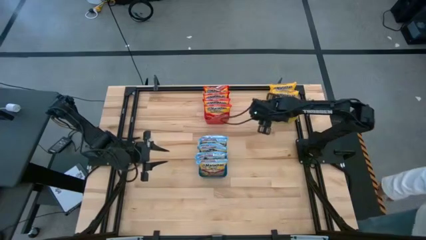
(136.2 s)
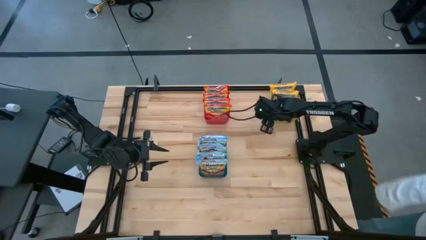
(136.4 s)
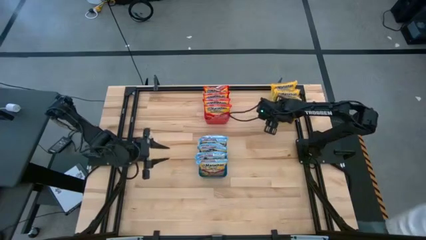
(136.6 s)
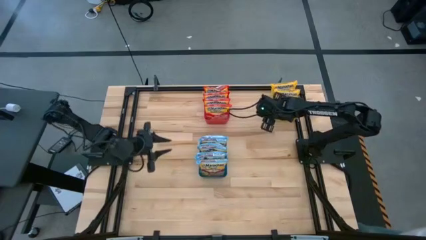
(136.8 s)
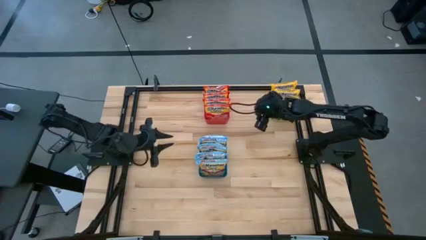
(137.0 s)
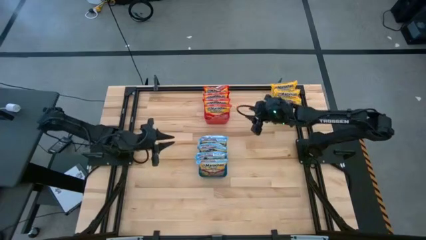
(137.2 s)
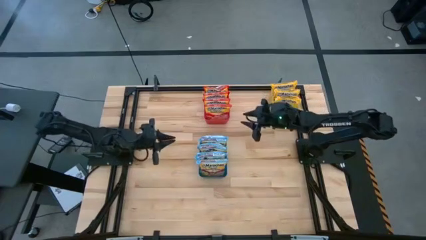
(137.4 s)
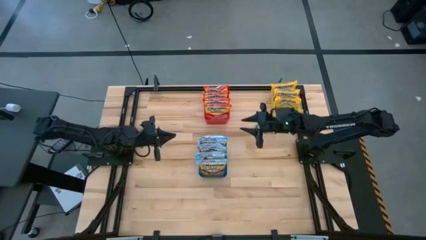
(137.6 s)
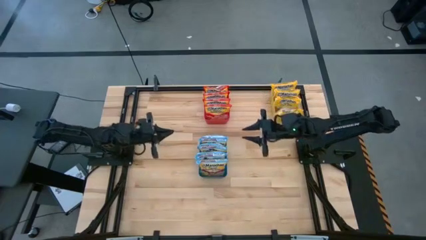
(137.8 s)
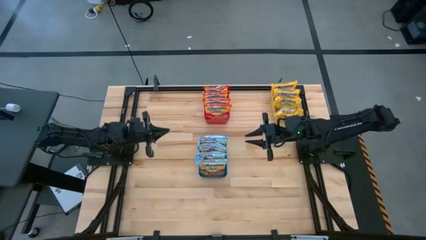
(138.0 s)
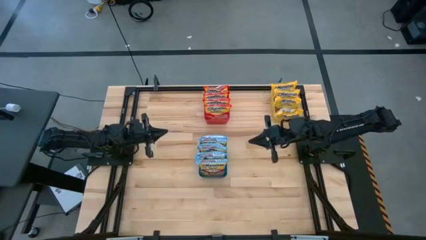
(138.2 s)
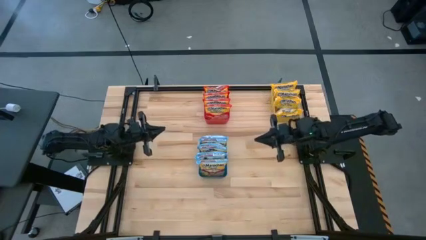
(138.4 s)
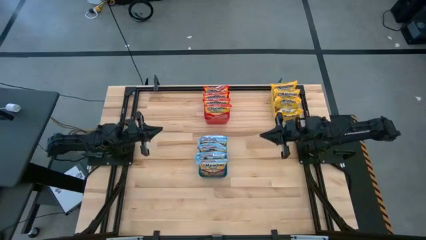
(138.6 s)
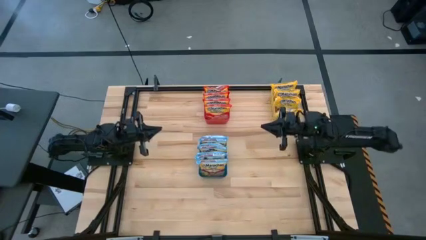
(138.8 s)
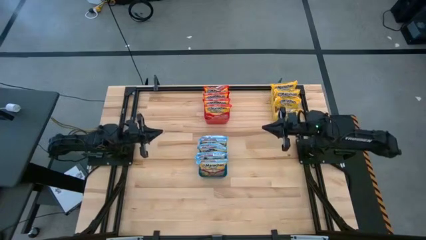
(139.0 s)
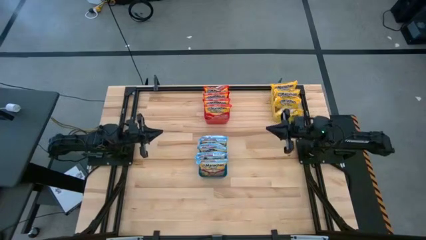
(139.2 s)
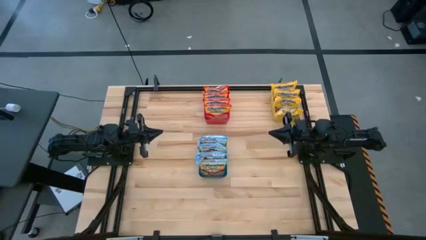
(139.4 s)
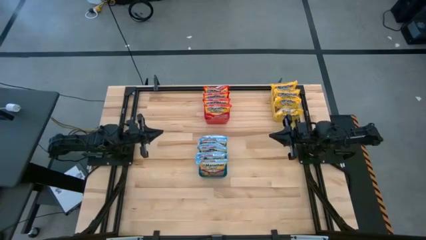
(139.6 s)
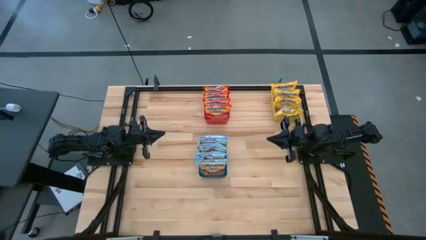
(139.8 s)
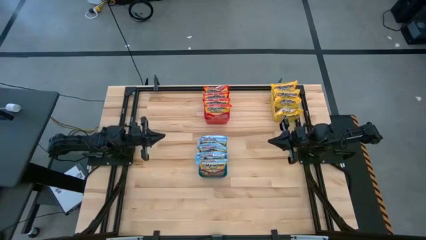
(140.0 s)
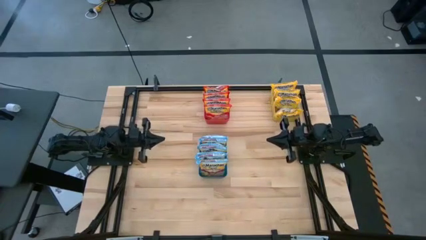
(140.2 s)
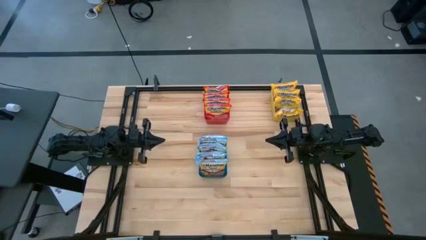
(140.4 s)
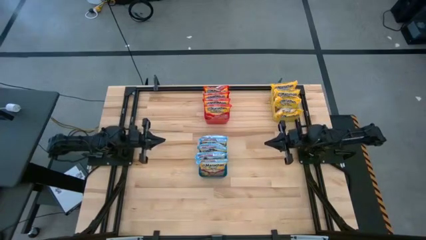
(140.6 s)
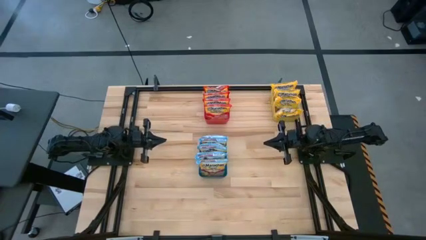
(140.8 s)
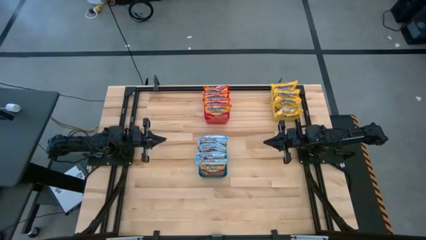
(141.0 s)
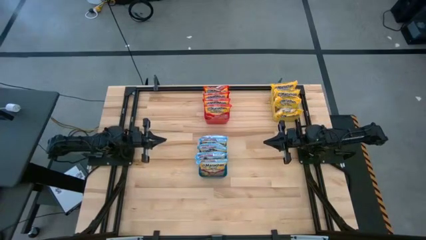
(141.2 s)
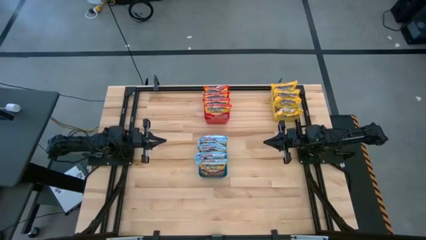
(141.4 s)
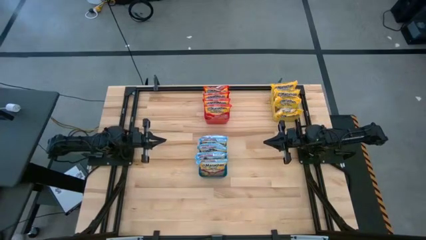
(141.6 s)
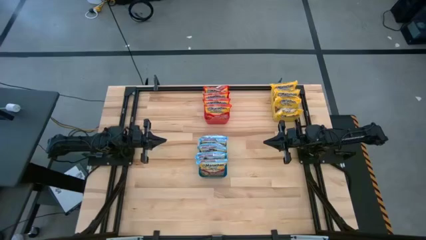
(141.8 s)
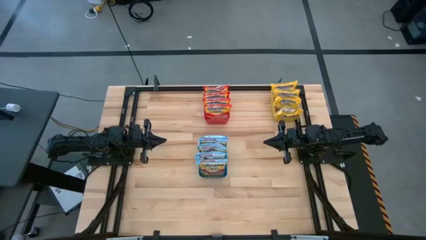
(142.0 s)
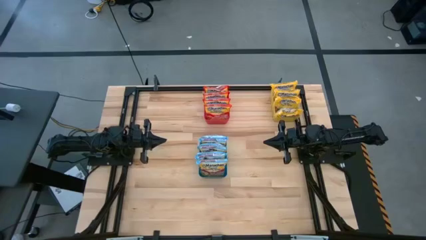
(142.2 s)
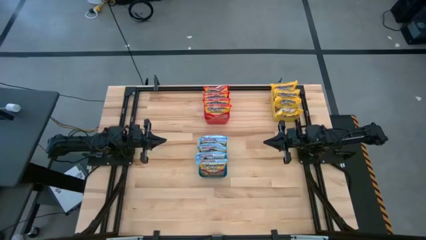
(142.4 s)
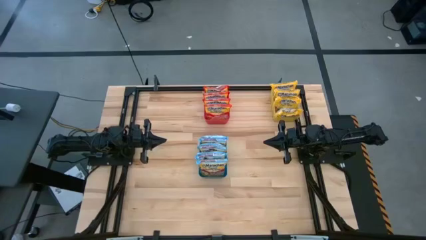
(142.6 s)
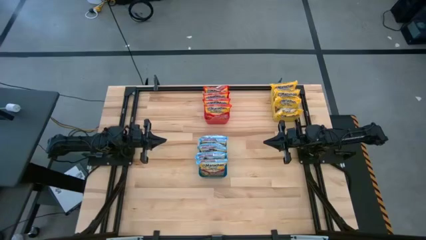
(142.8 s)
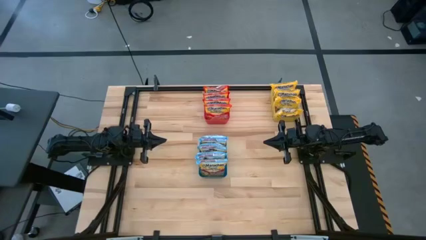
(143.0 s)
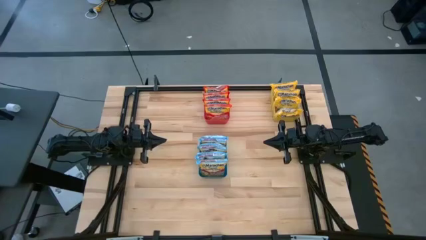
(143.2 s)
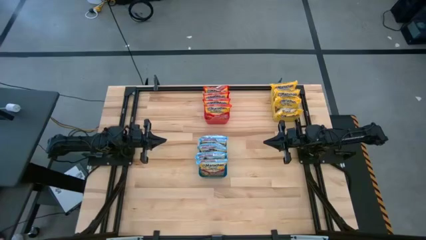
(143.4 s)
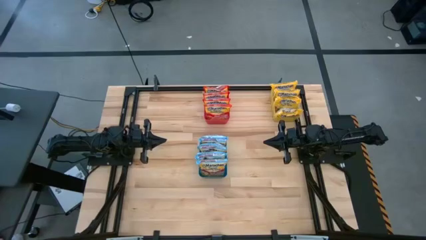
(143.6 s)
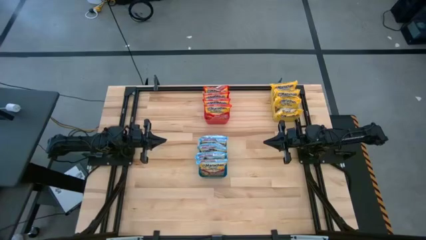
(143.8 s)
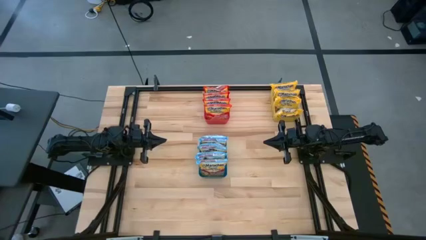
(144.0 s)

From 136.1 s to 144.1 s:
Task: Sort Maruchan noodles
Return to Home Position

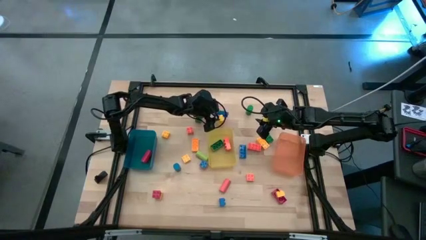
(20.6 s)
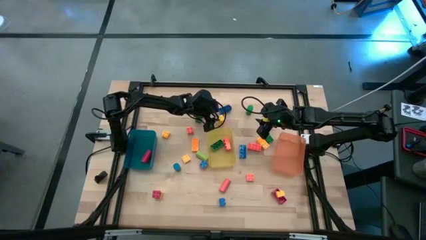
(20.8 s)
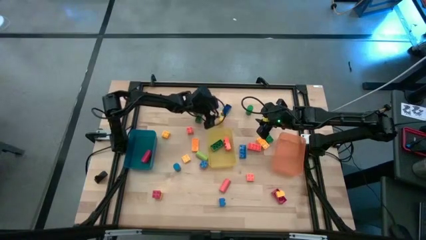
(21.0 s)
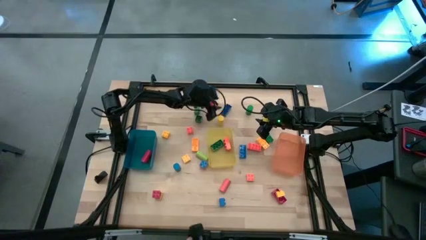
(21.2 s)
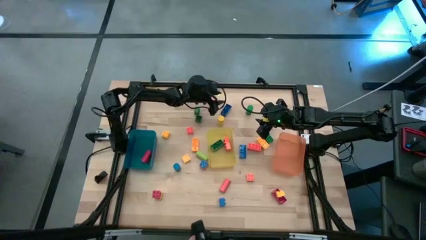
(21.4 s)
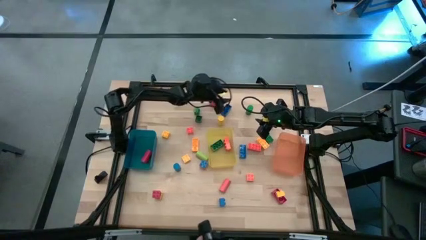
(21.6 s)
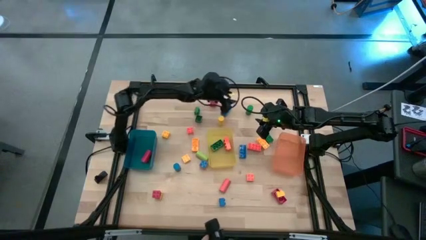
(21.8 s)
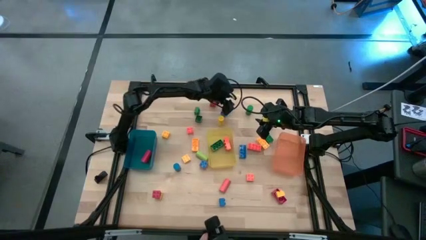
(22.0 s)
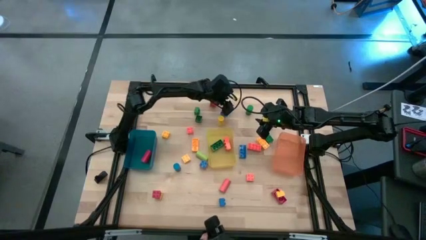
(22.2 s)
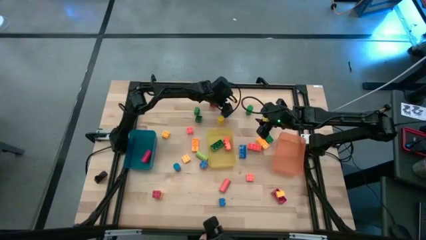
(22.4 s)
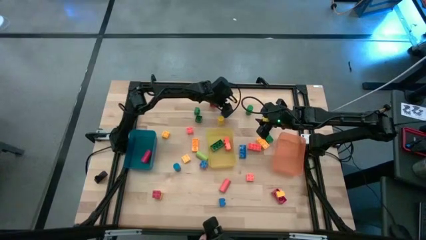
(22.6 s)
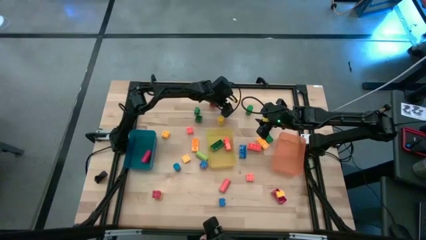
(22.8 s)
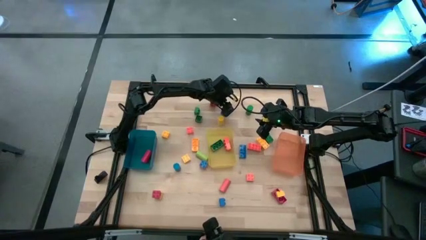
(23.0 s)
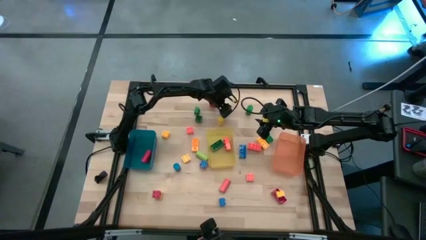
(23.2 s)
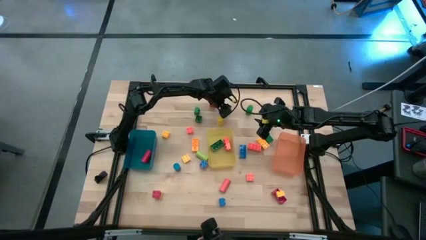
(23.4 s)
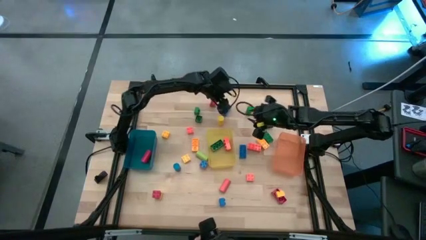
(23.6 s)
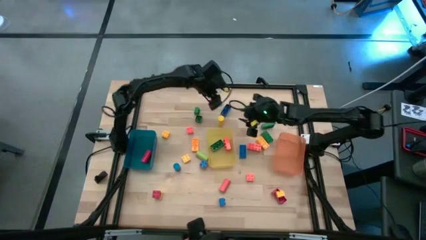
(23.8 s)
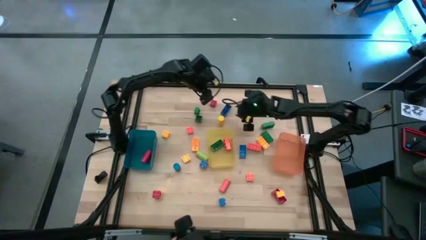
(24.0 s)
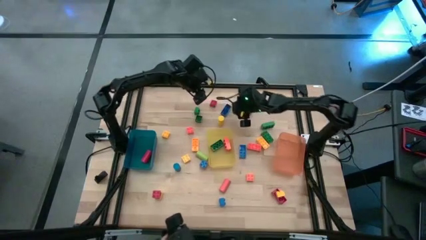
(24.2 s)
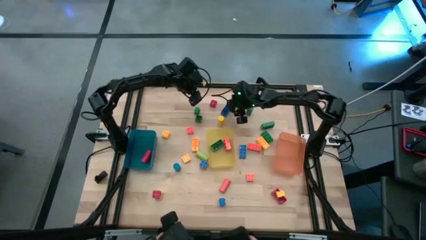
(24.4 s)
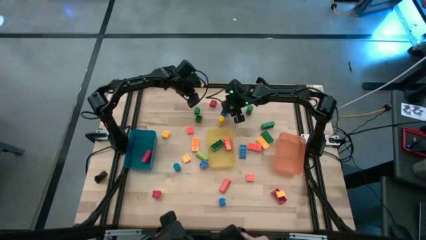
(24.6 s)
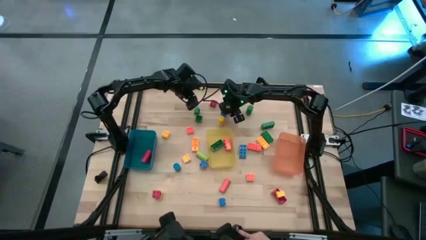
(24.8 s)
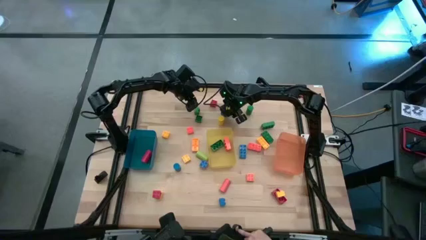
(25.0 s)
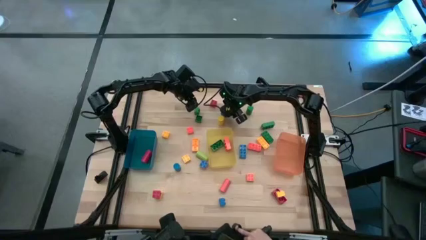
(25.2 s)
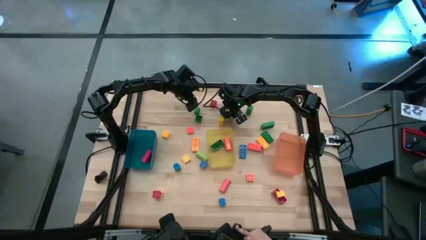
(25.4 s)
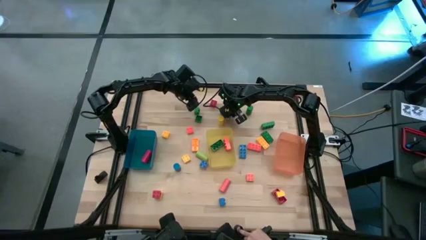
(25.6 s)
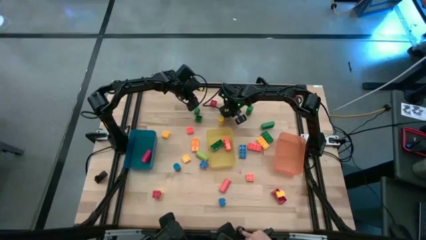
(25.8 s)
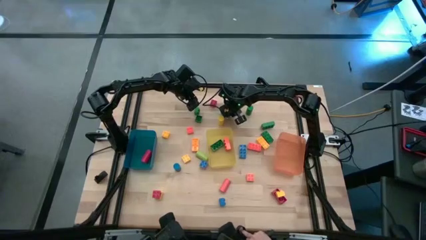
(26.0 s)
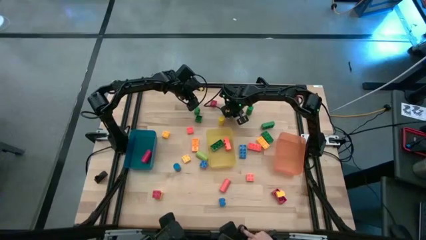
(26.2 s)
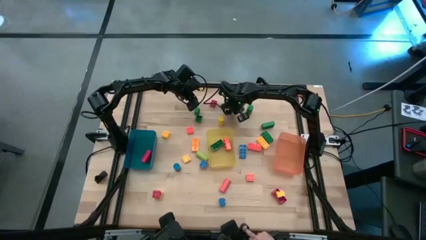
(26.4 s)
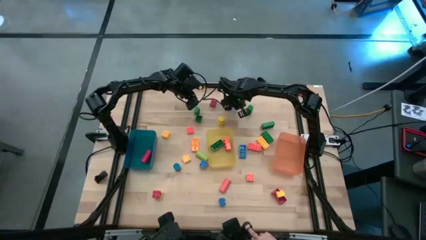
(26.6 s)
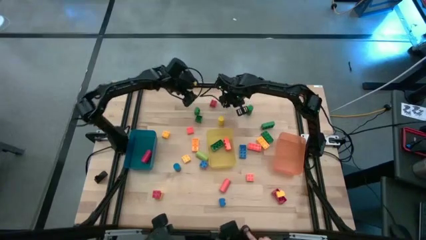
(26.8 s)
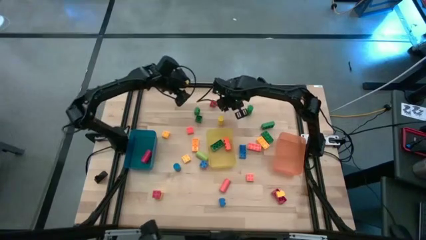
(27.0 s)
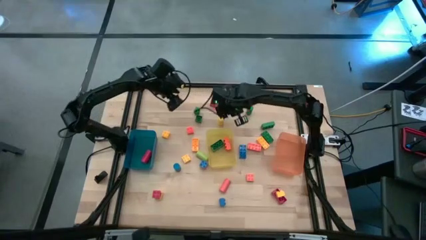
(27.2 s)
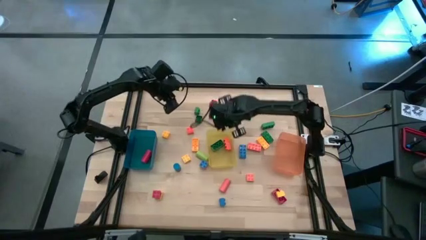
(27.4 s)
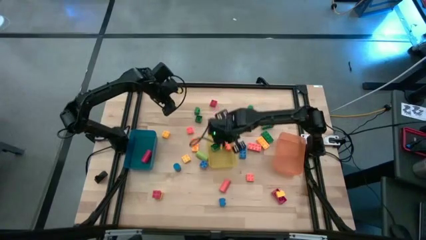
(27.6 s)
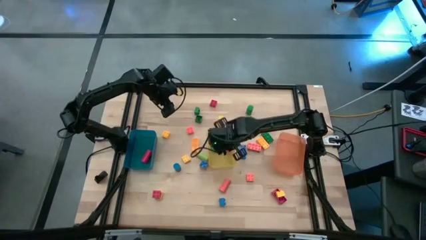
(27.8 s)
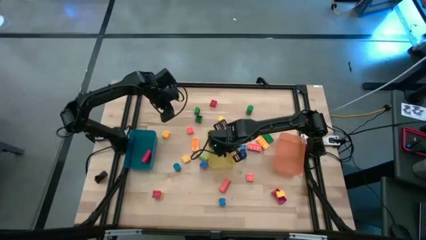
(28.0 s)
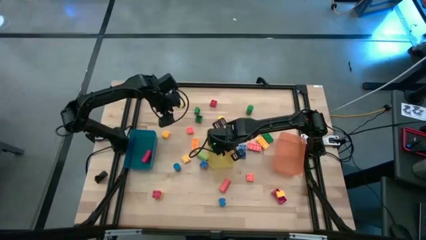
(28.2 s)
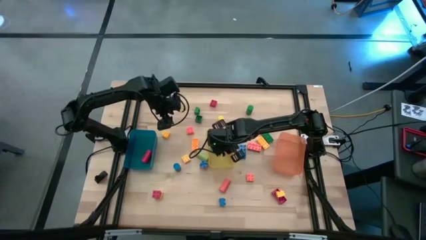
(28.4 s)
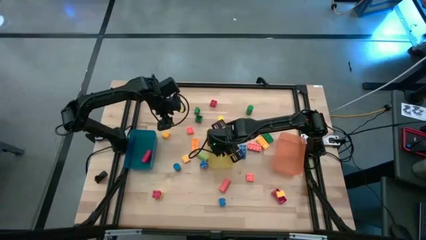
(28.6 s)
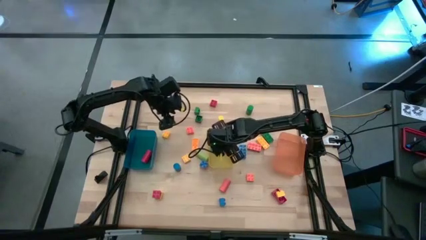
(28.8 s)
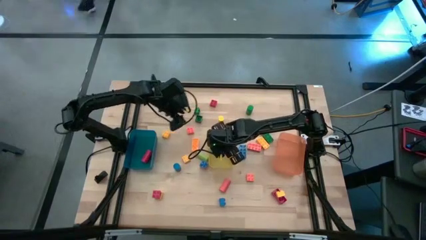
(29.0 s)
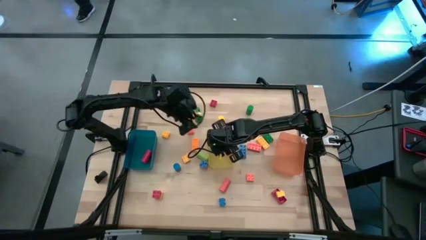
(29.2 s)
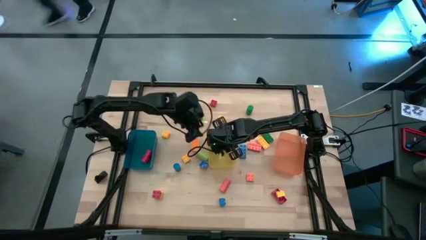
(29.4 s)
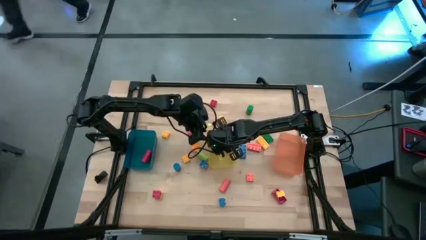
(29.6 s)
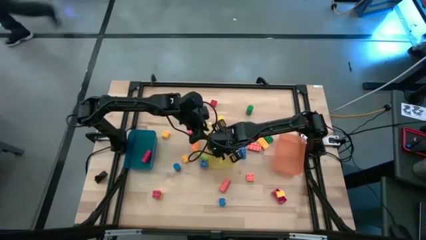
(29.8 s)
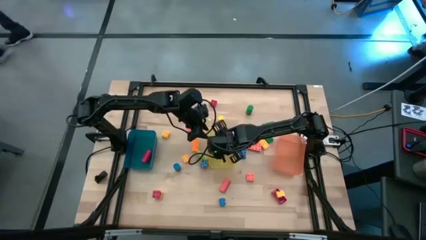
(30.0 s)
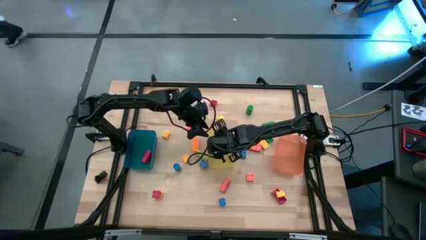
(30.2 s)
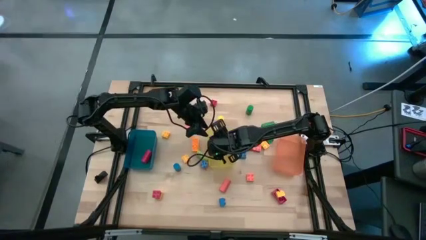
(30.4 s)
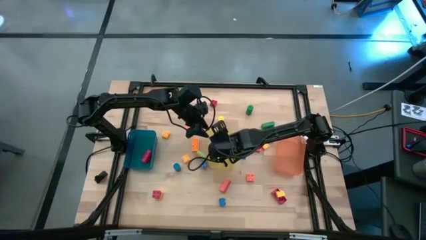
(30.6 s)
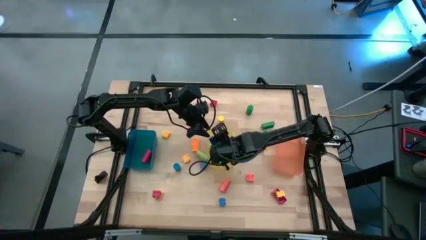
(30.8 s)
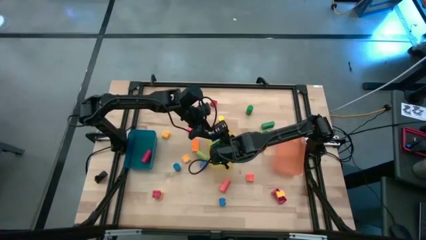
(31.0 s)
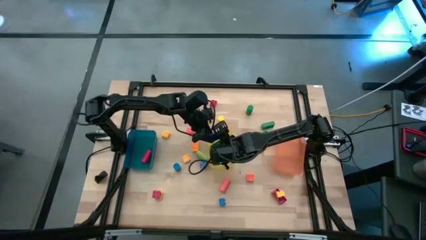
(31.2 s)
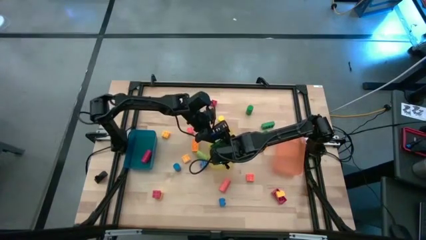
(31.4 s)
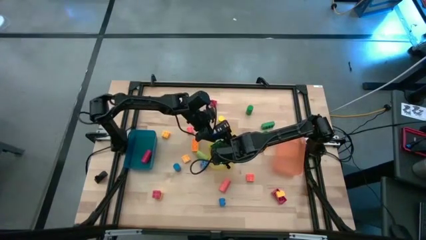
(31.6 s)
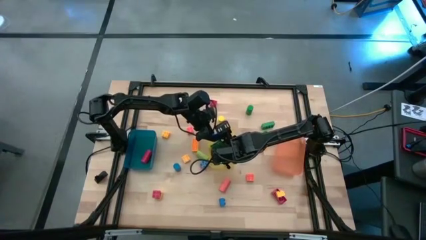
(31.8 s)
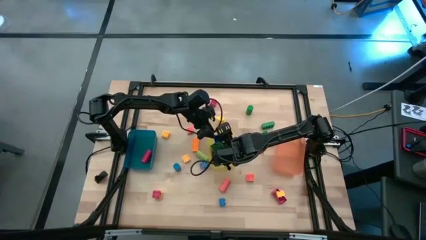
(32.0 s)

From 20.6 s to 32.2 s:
Task: Sort blocks by size
Put the blue 8 stud game piece into the yellow bin
